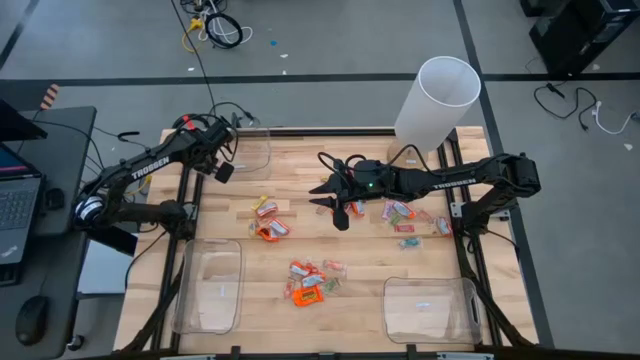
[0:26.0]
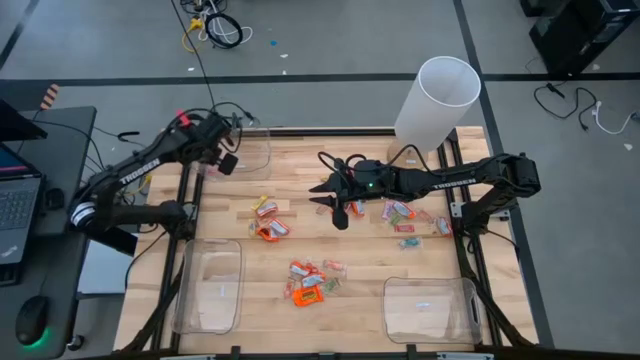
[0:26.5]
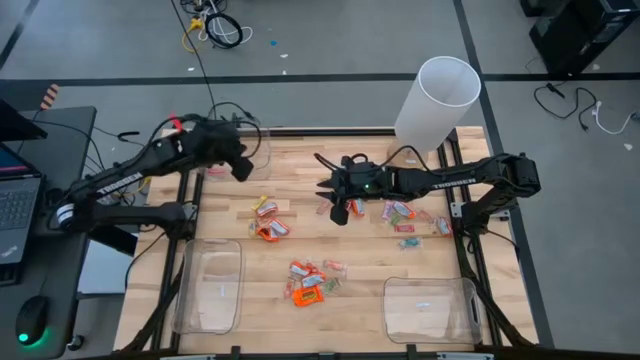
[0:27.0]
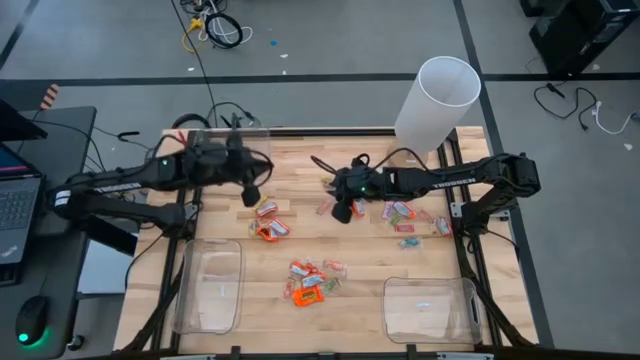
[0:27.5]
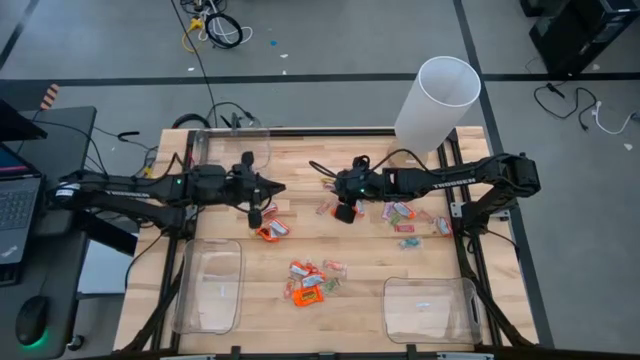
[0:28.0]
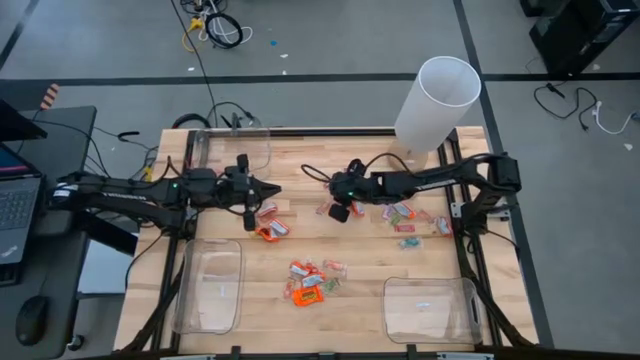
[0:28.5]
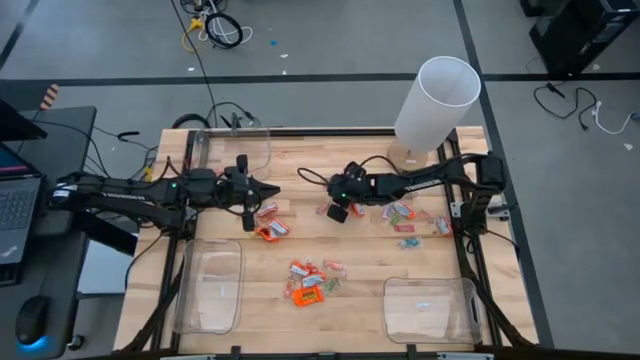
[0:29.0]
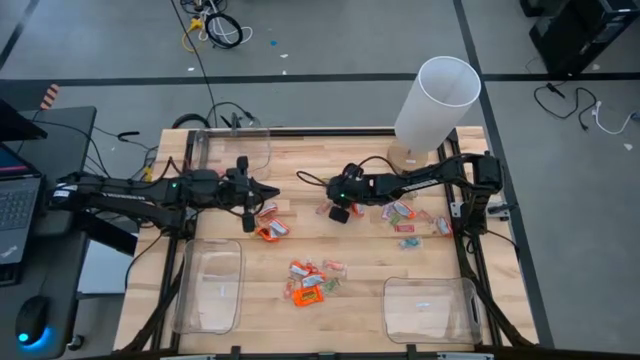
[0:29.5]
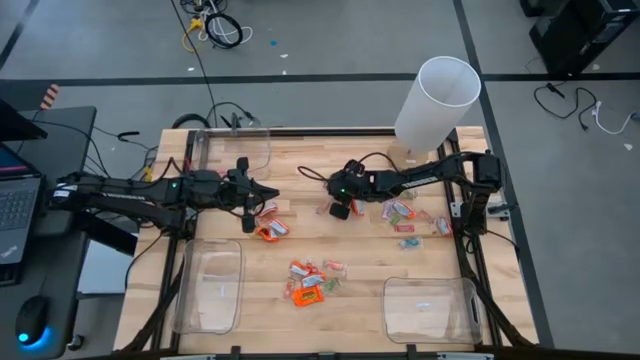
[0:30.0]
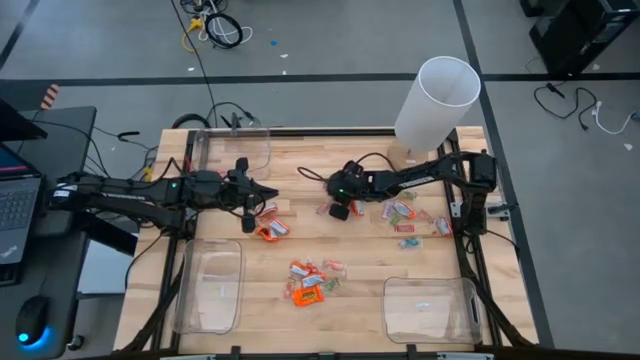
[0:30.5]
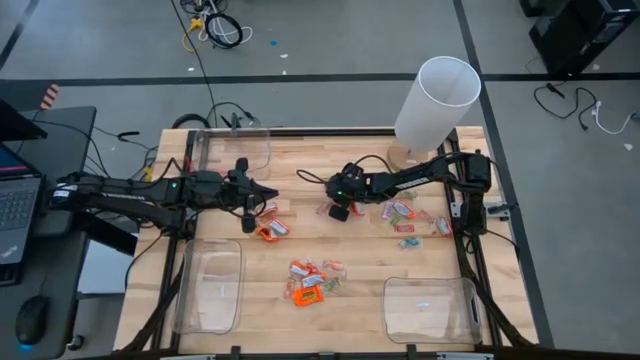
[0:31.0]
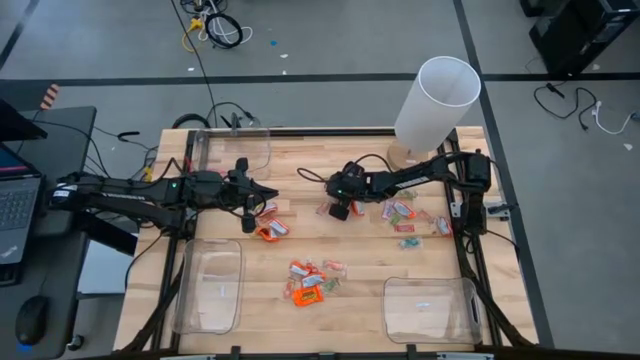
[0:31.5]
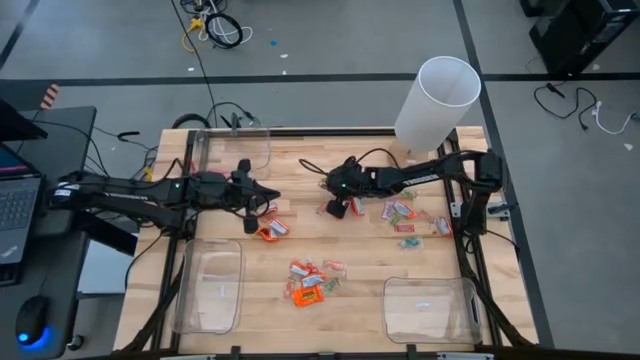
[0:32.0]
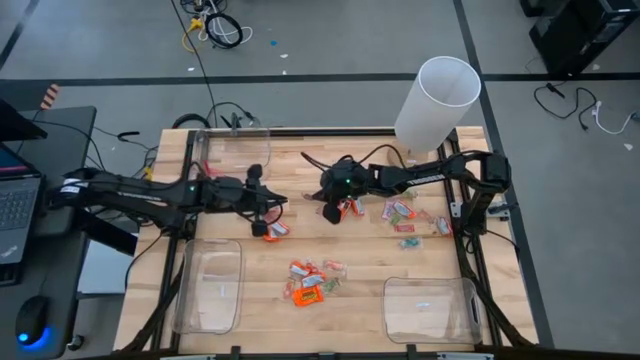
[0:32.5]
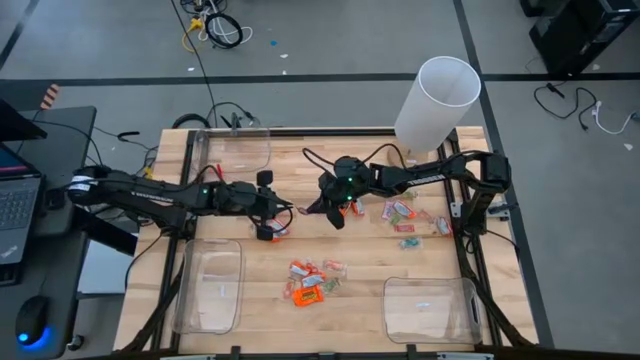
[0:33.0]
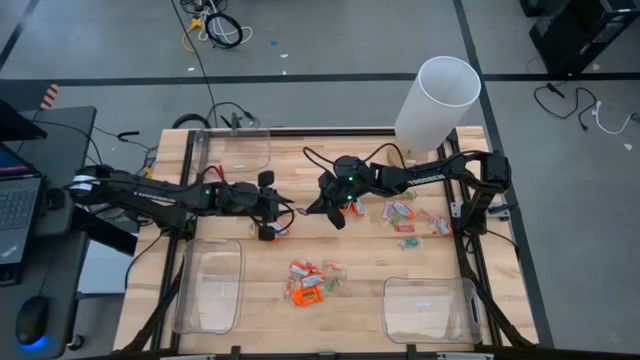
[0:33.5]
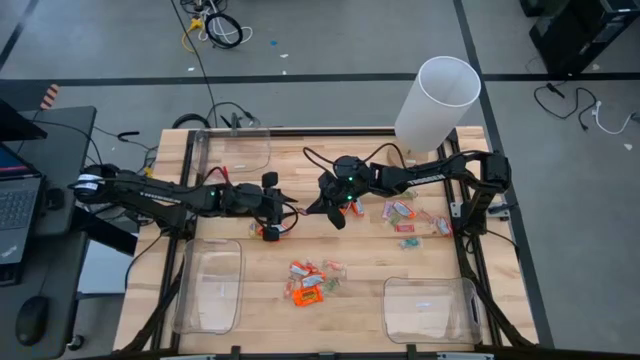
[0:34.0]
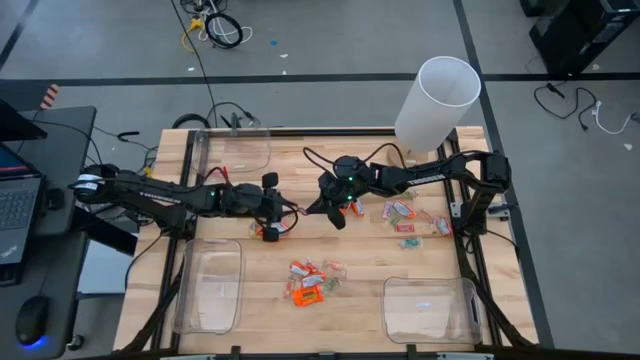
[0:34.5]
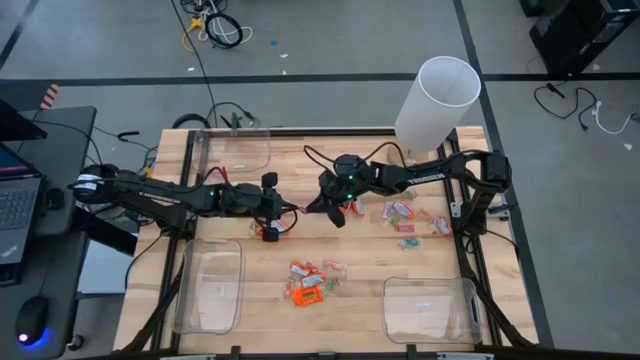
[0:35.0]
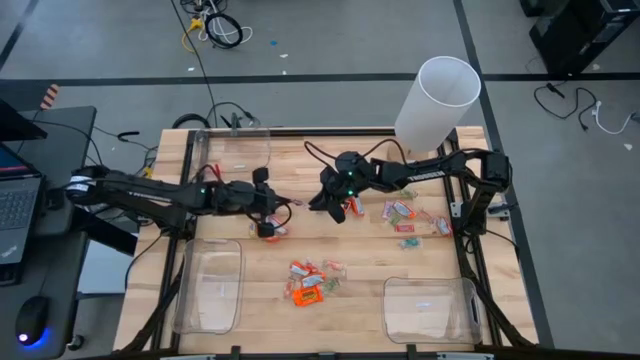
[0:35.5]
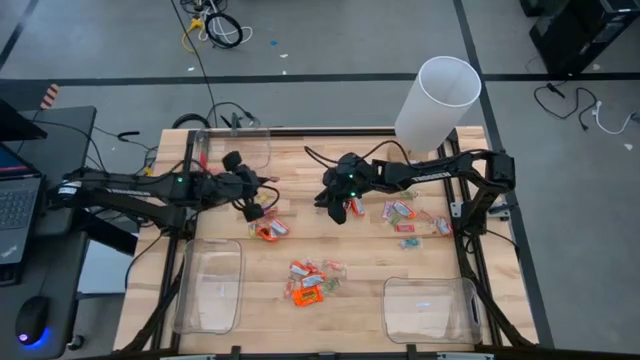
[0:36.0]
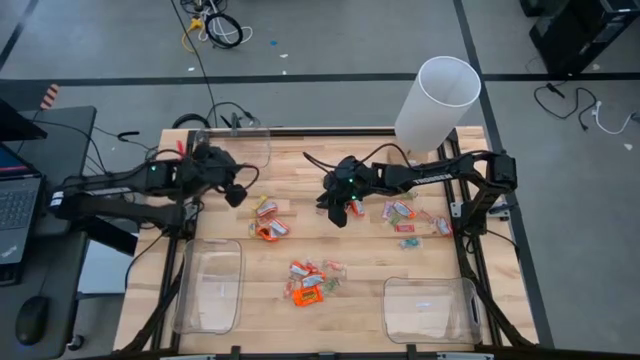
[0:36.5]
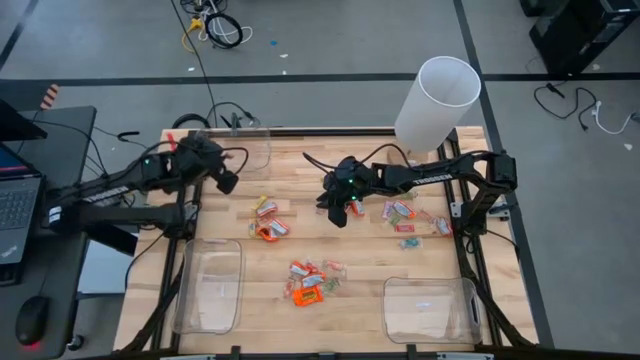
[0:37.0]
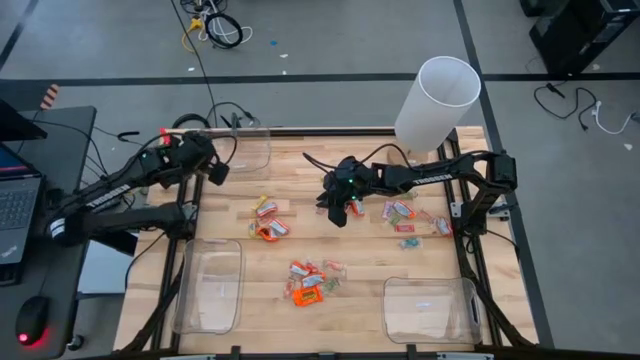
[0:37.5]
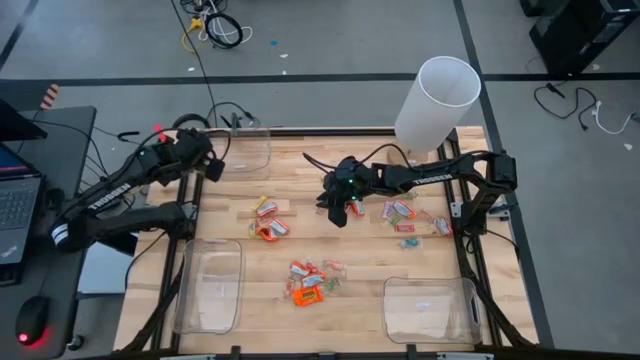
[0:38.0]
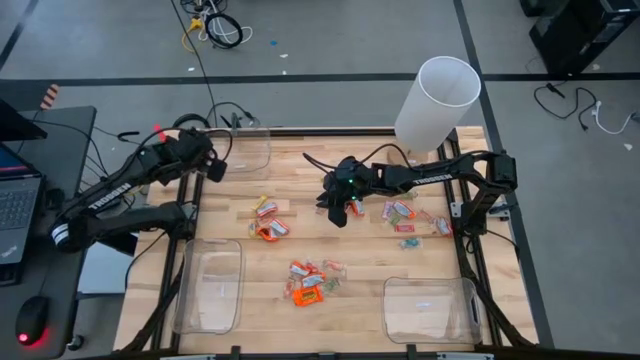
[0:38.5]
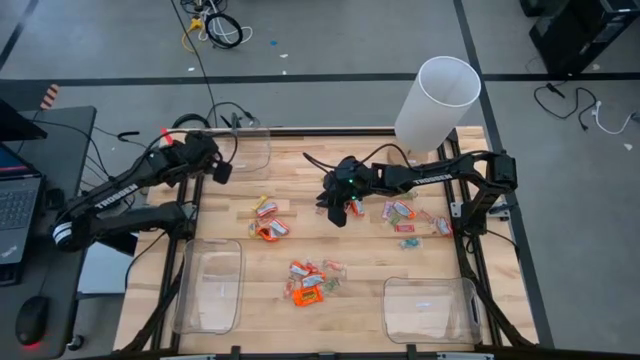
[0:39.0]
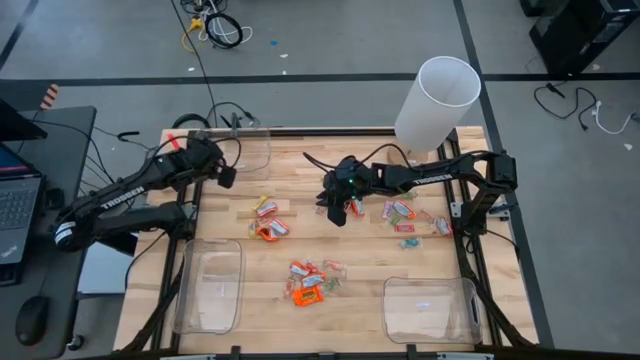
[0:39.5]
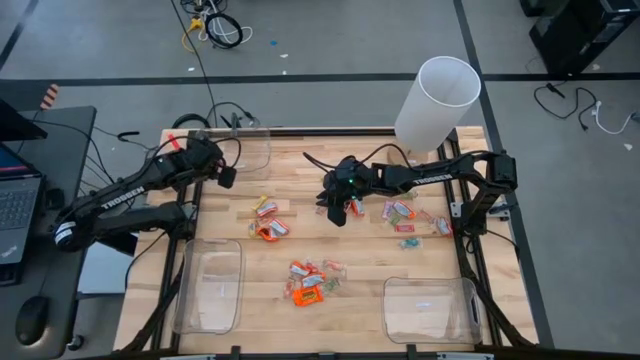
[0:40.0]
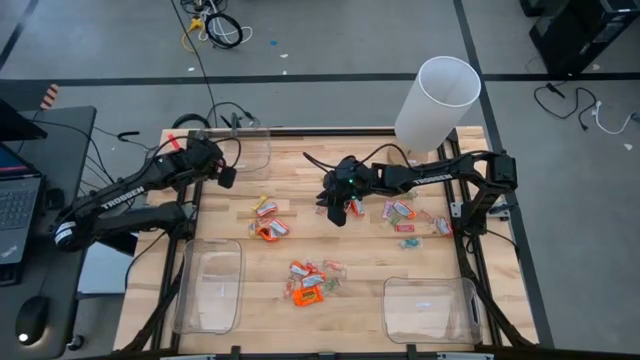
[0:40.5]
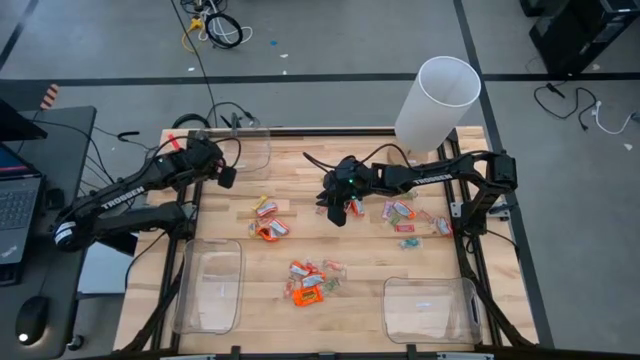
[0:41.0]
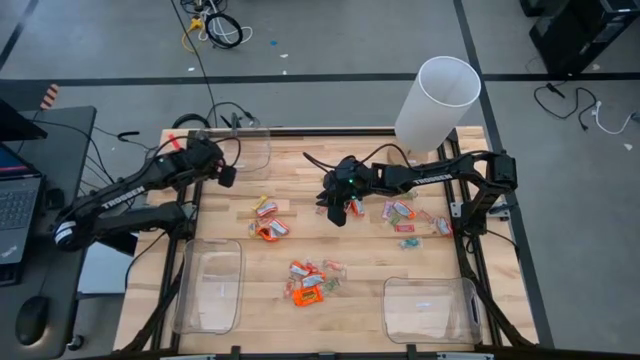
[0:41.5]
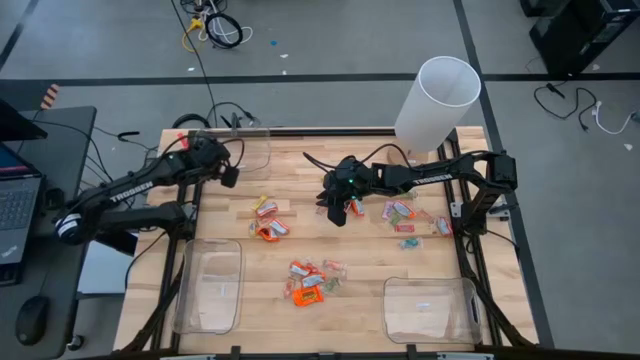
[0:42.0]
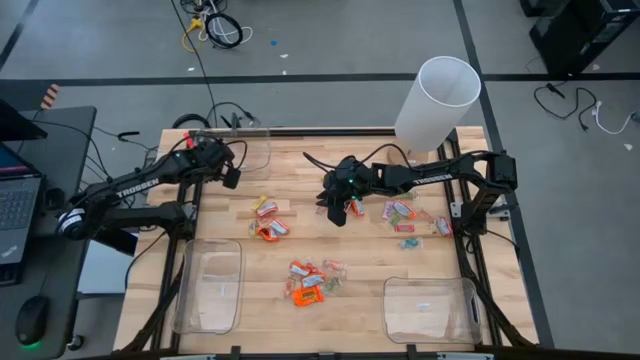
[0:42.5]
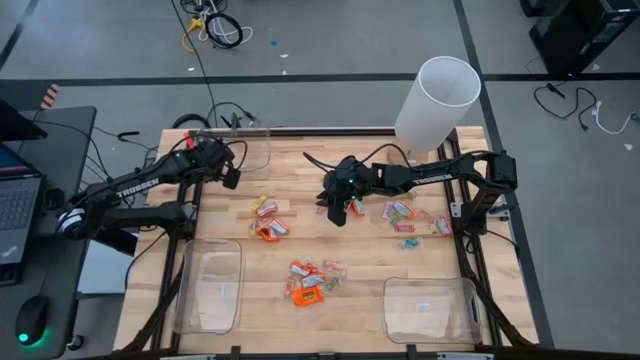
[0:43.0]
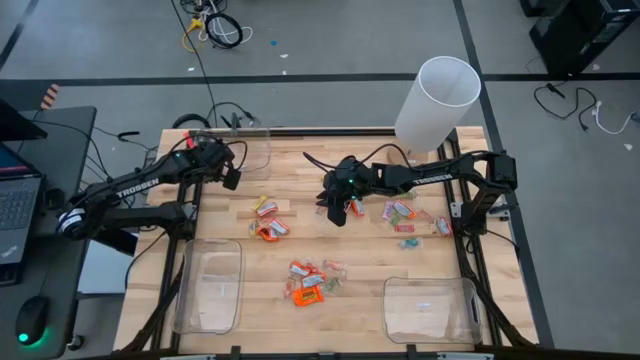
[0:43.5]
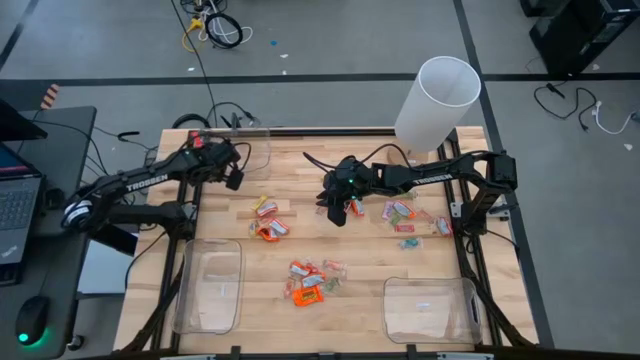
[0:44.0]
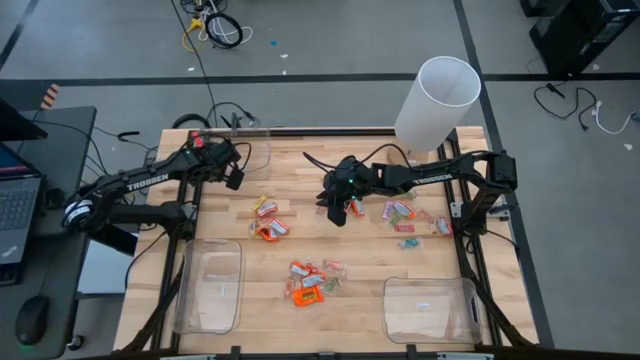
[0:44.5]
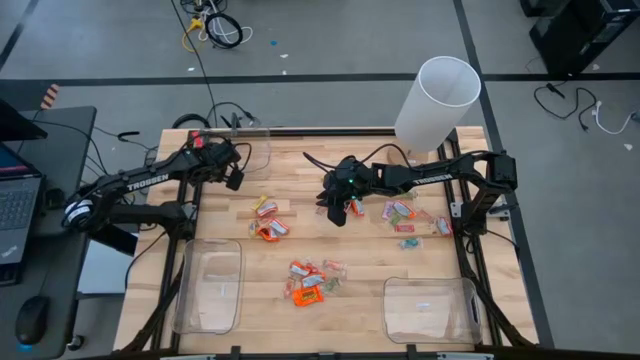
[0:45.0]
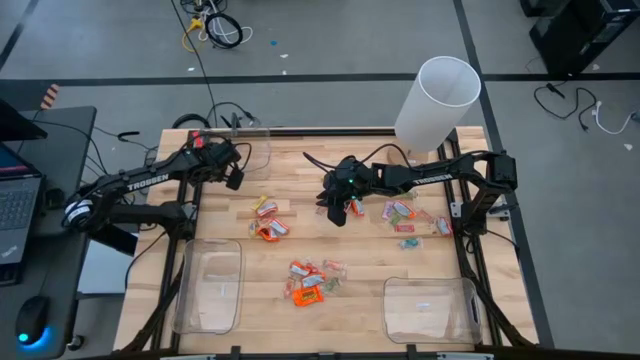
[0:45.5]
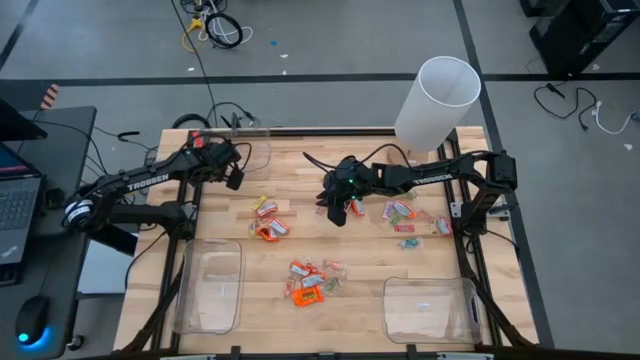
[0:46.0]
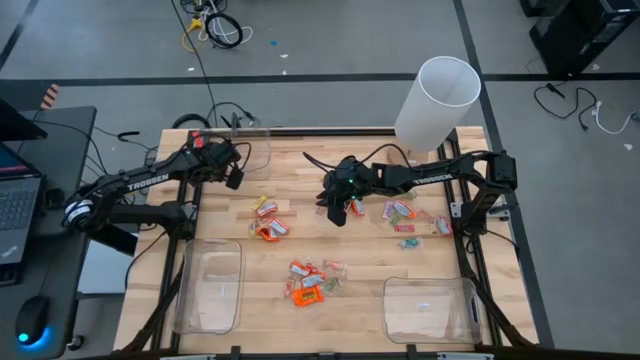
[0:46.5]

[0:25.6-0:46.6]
Task: Sort candy
Put the red candy into the top left transparent bin

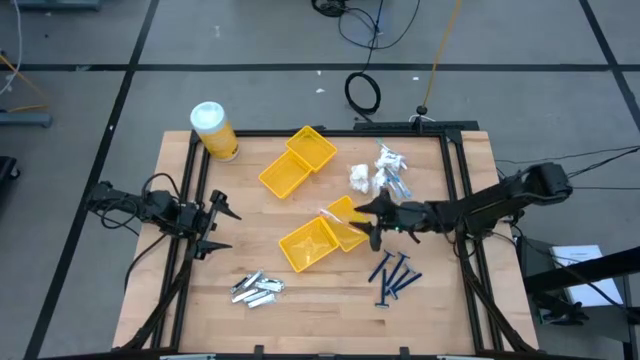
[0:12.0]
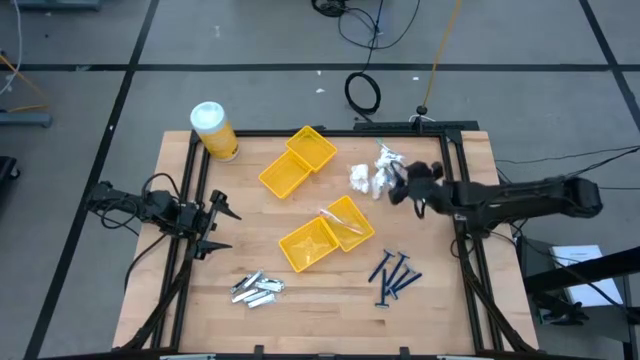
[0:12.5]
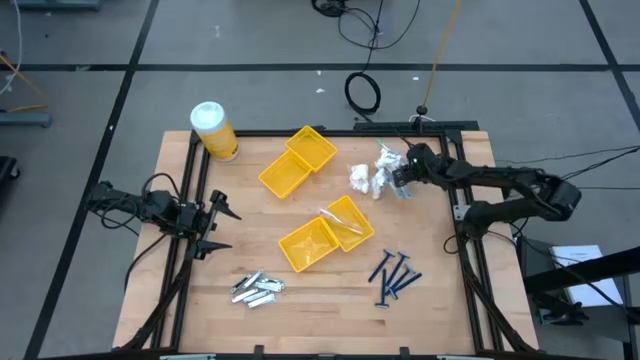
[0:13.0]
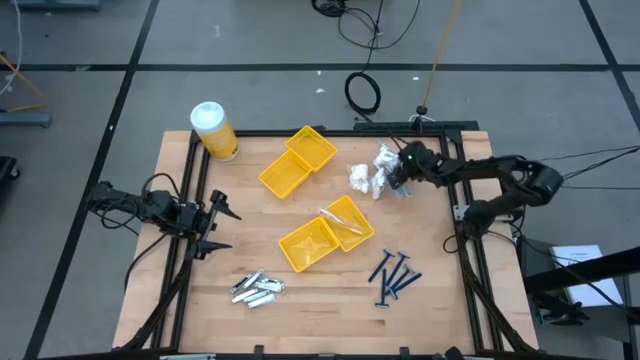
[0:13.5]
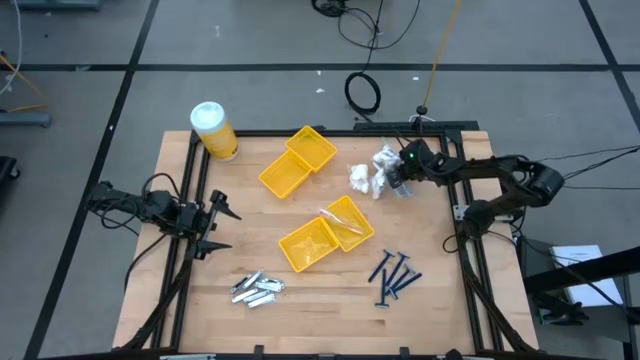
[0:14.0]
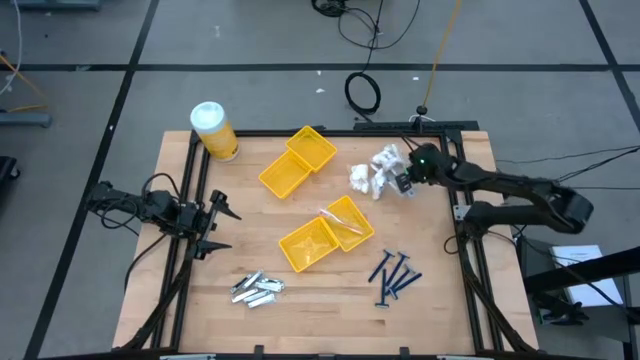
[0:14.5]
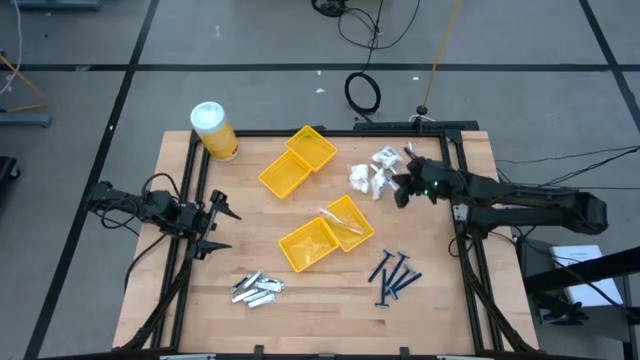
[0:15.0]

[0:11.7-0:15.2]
Task: Pick & Place Travel size toiletries
Put the green toothbrush into the bottom right yellow basket
